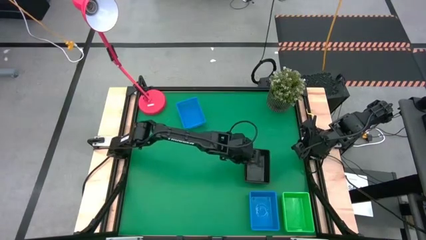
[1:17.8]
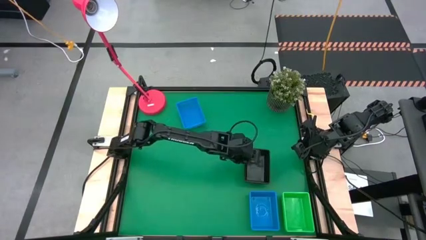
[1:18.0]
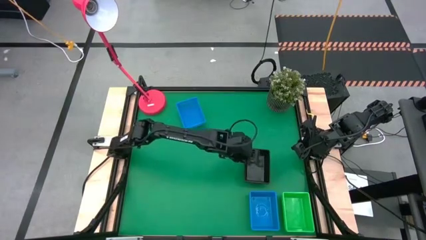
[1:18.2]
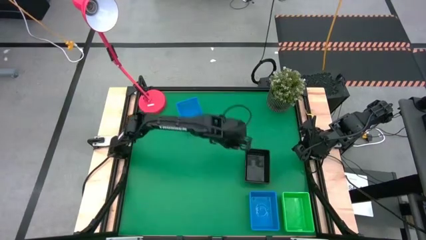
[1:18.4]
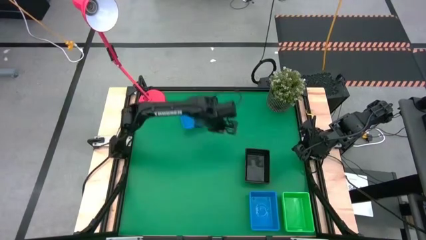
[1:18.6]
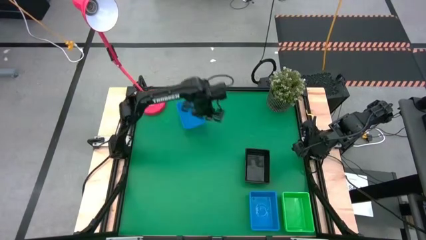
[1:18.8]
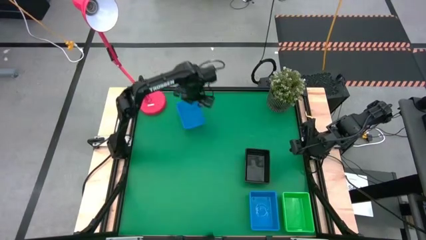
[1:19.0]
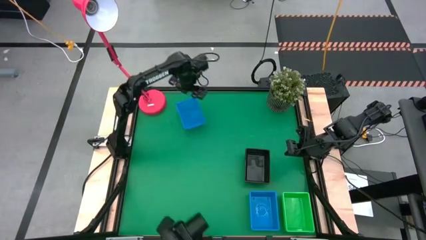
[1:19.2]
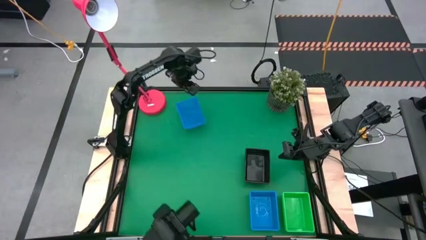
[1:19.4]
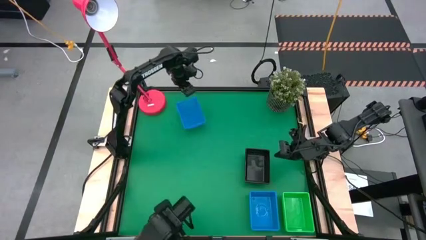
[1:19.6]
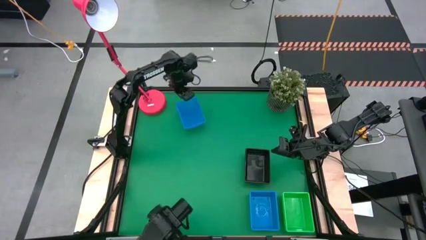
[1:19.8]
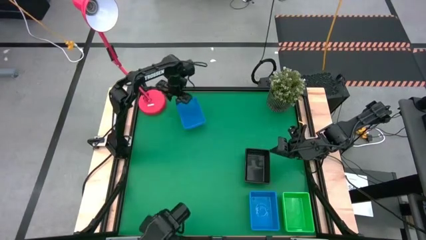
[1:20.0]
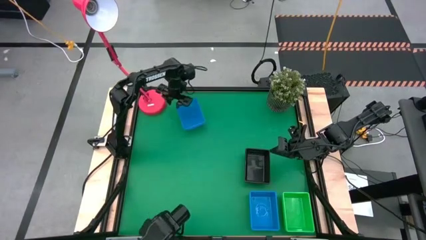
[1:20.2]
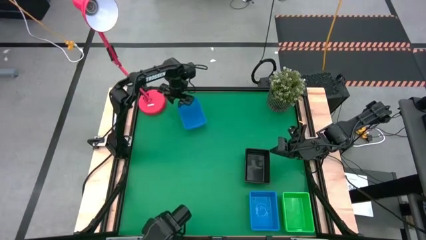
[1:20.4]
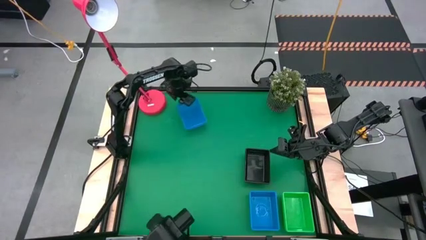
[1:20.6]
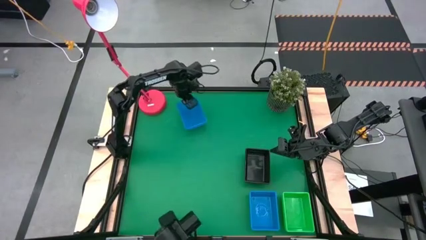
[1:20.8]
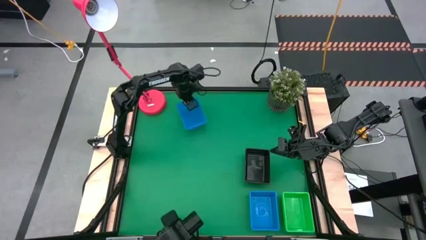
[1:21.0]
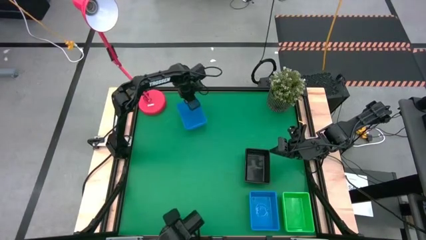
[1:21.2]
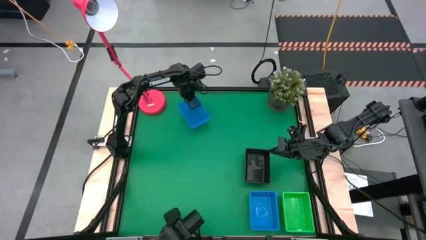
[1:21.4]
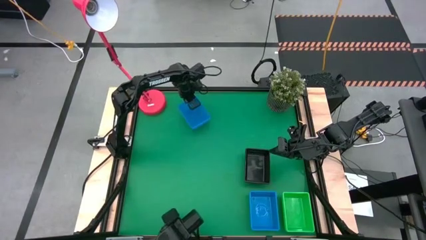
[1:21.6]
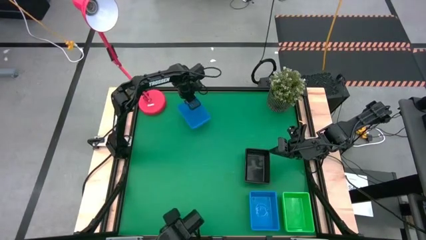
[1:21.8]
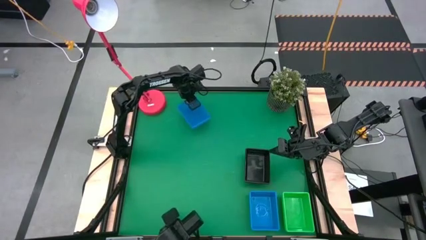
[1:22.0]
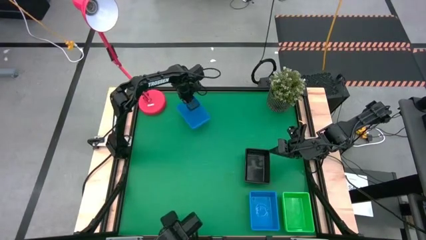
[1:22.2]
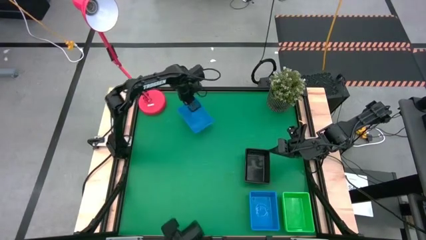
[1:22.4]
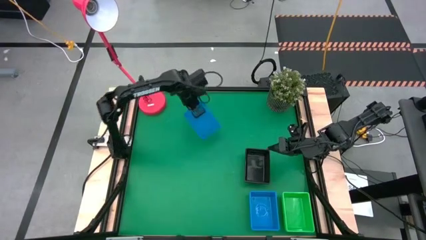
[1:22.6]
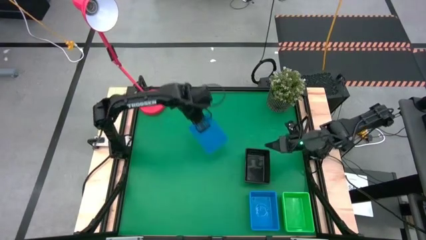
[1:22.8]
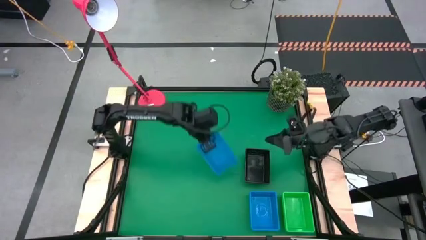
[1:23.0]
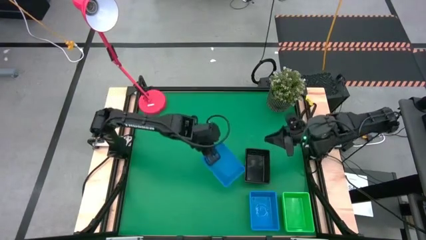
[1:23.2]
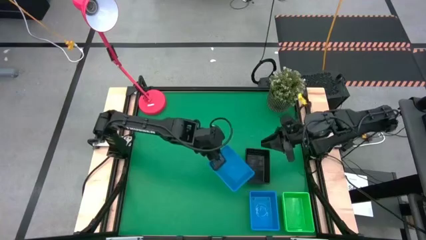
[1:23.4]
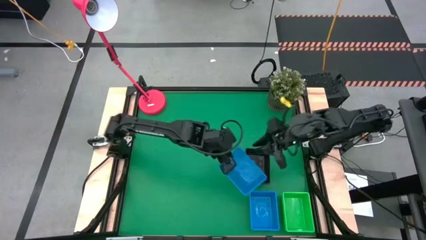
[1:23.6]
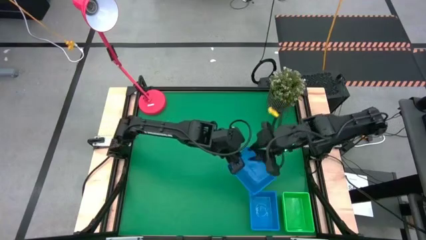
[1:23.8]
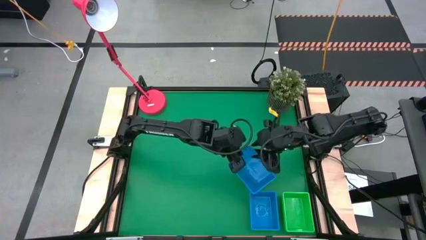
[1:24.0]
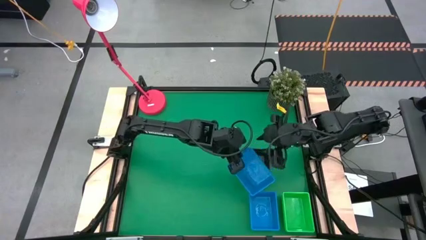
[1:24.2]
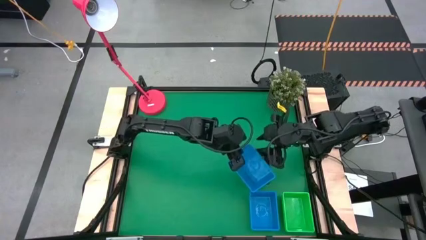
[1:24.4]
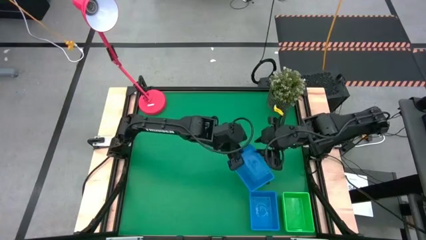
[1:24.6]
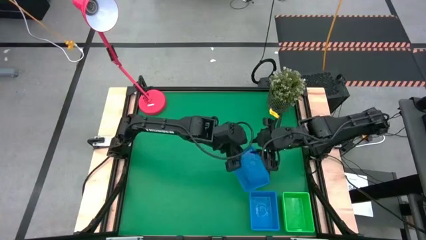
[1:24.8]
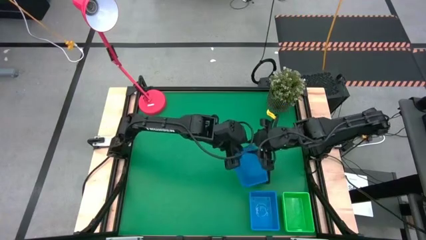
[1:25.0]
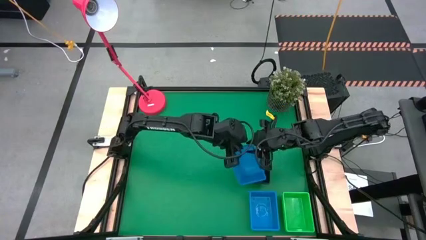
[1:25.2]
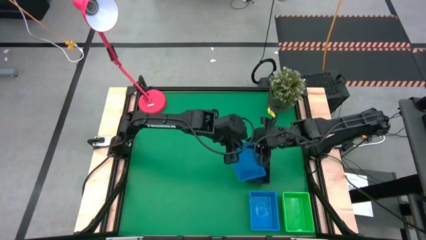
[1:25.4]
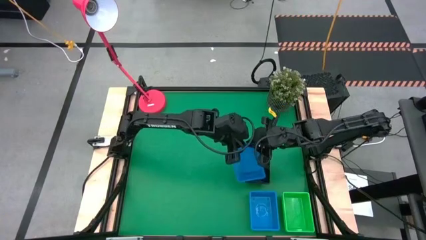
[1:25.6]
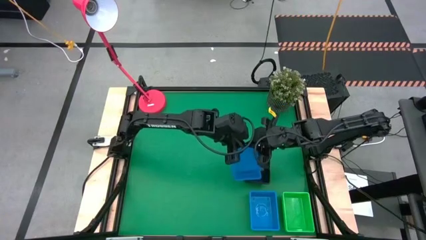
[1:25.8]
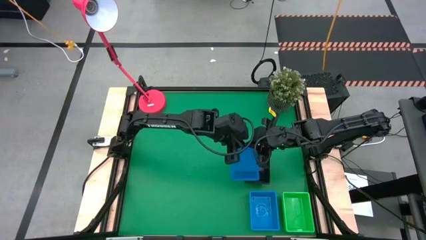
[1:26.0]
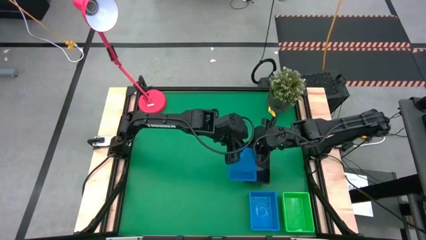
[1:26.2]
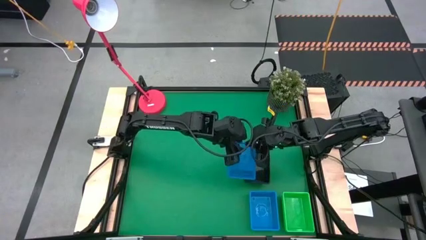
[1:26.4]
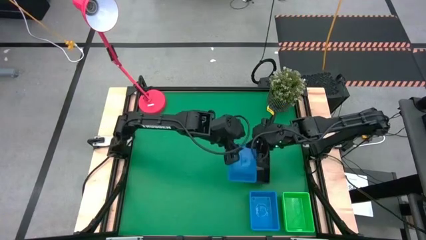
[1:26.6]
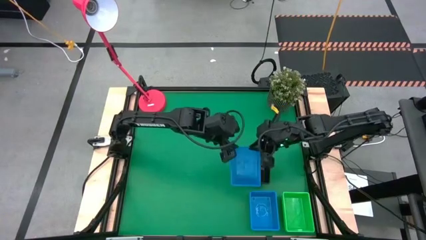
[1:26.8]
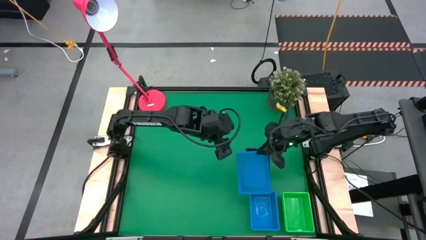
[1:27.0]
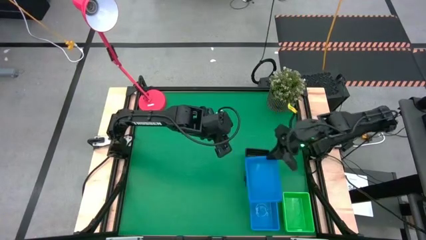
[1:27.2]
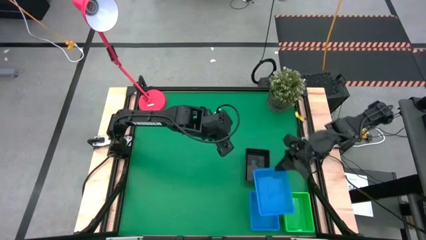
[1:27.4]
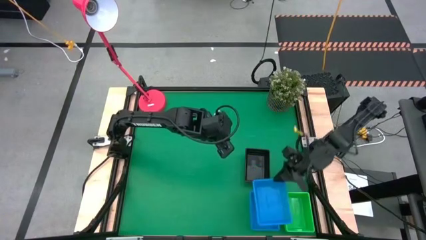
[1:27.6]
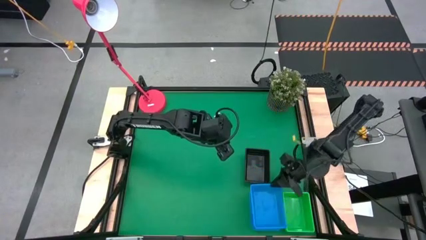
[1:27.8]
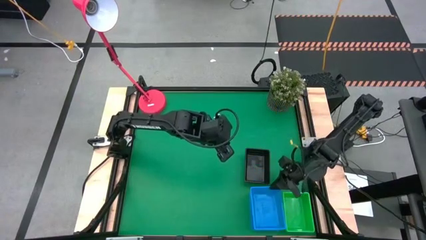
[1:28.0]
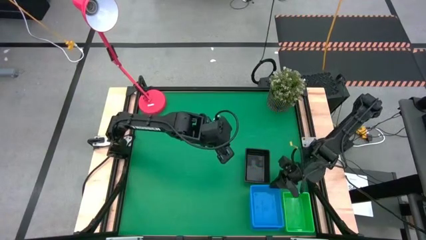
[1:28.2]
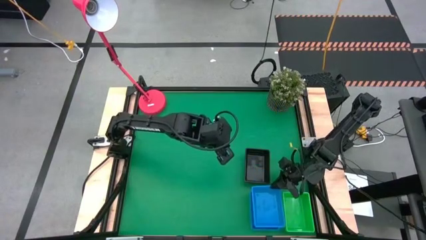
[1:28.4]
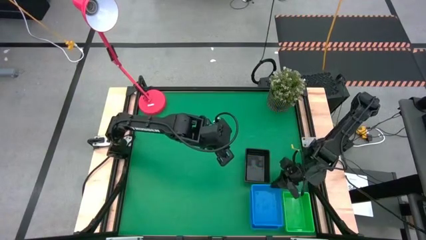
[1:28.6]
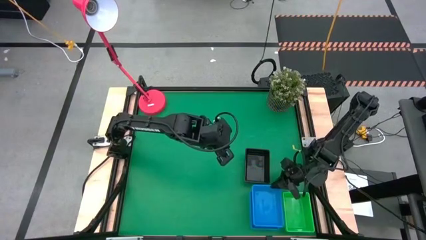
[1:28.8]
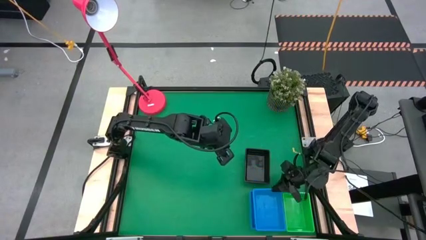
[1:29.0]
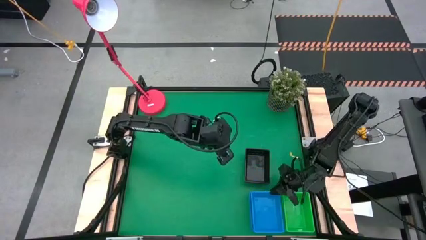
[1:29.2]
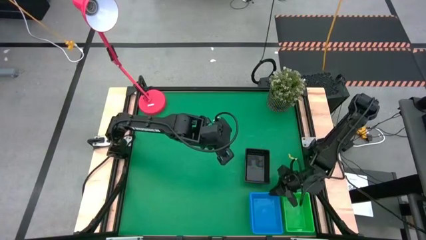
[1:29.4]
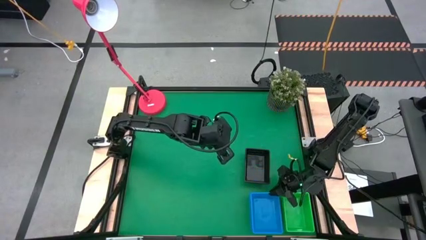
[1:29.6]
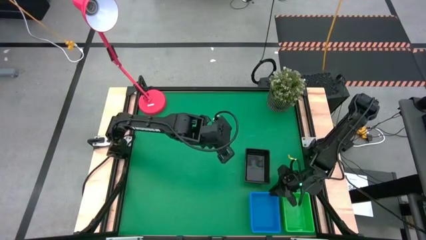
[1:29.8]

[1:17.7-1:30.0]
Stack the top blue bin on the blue bins
